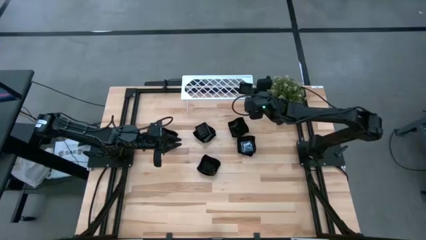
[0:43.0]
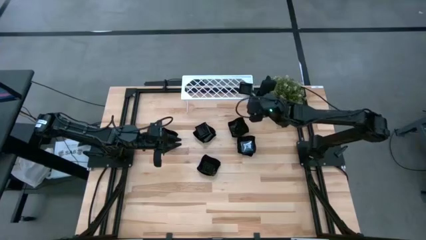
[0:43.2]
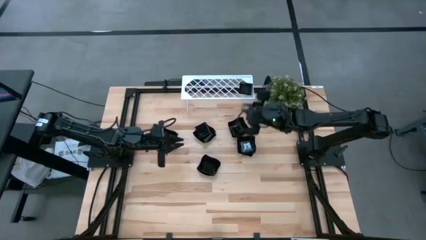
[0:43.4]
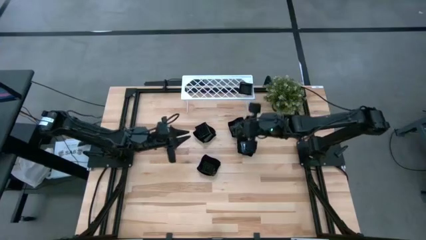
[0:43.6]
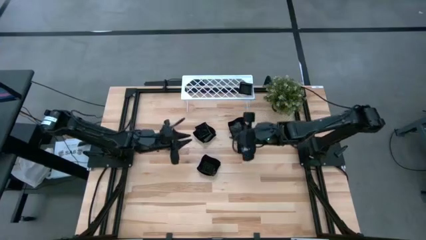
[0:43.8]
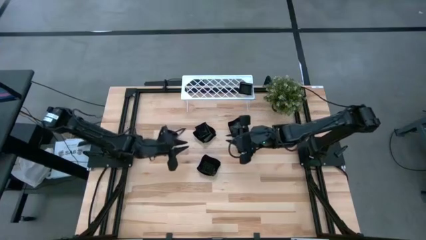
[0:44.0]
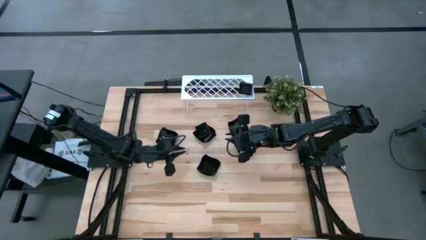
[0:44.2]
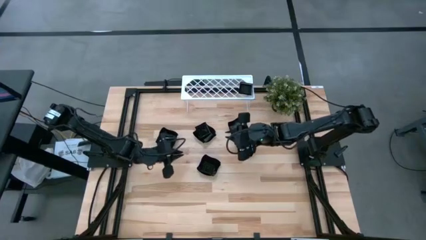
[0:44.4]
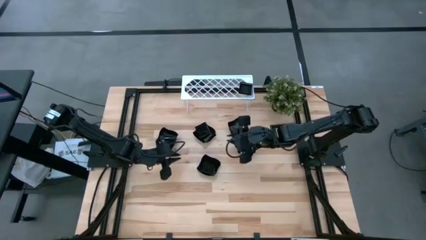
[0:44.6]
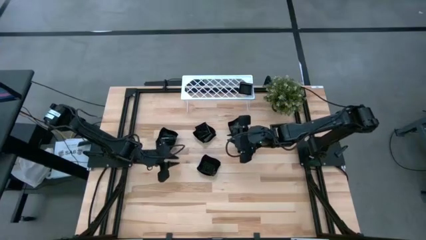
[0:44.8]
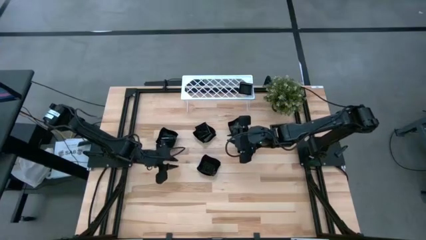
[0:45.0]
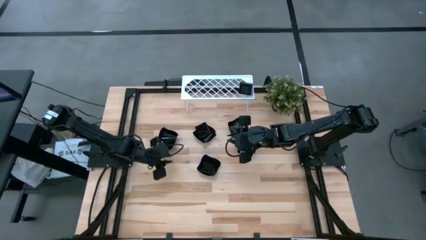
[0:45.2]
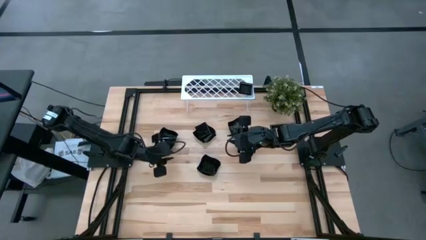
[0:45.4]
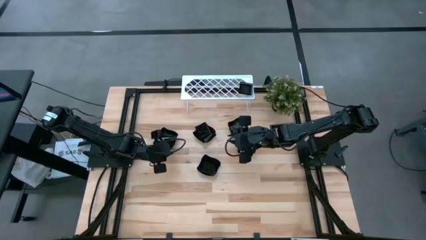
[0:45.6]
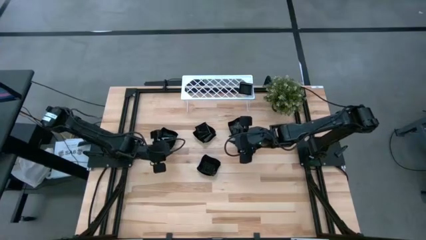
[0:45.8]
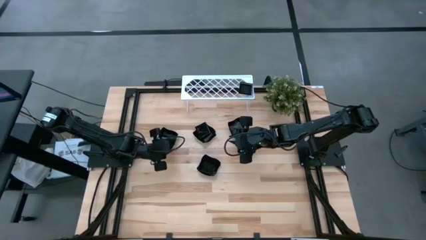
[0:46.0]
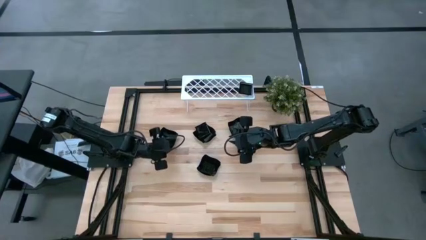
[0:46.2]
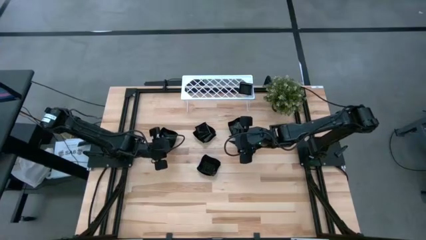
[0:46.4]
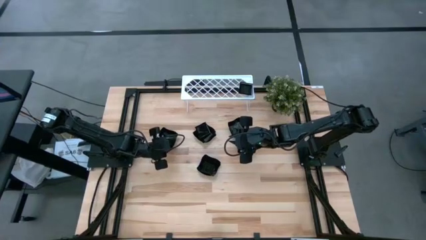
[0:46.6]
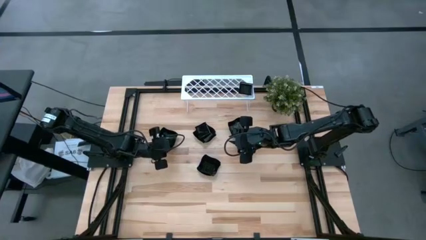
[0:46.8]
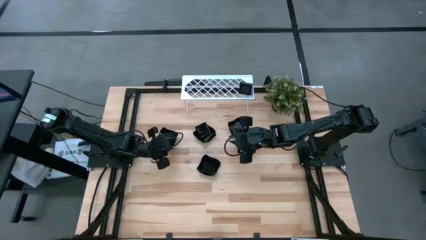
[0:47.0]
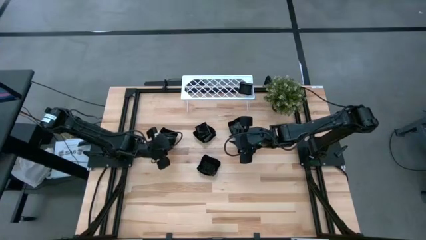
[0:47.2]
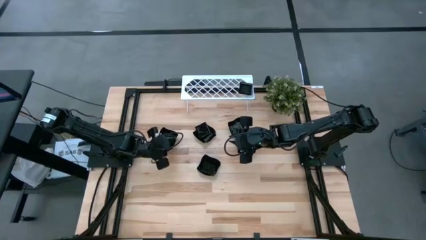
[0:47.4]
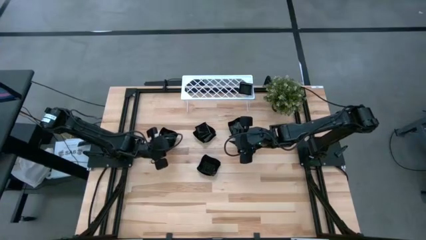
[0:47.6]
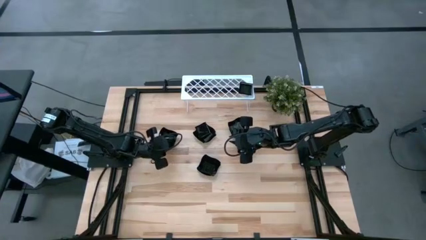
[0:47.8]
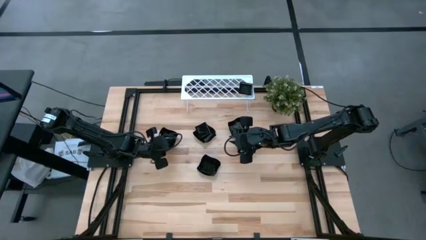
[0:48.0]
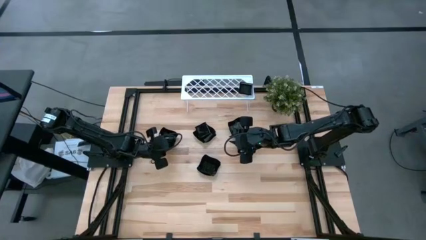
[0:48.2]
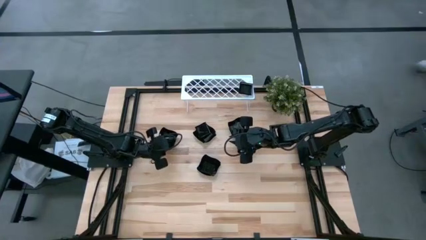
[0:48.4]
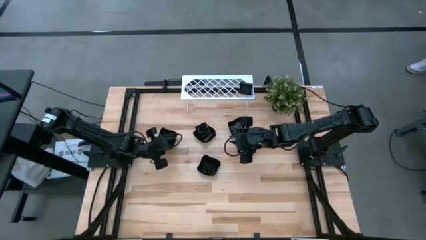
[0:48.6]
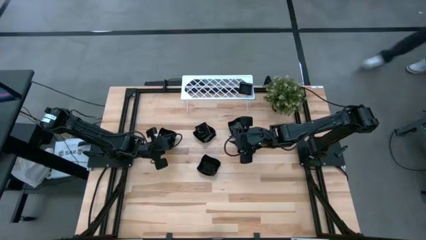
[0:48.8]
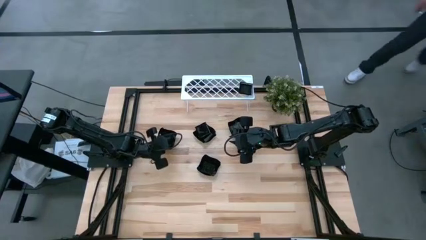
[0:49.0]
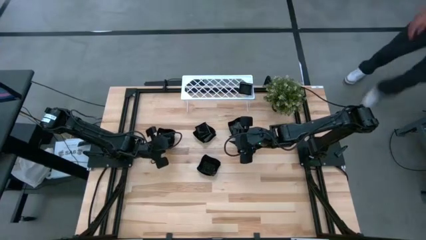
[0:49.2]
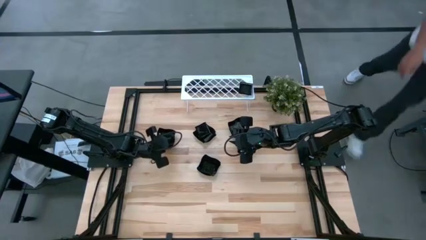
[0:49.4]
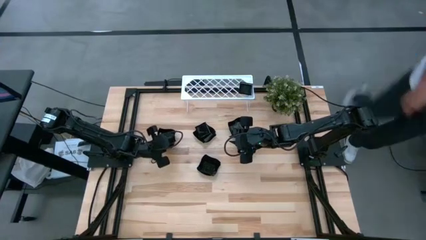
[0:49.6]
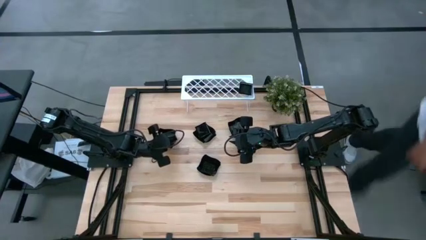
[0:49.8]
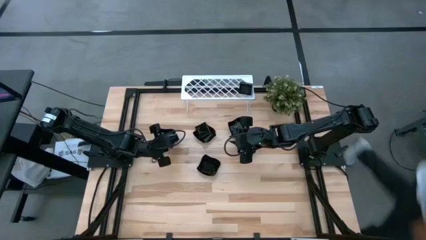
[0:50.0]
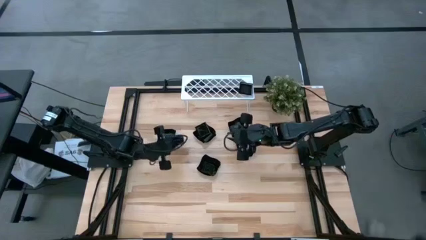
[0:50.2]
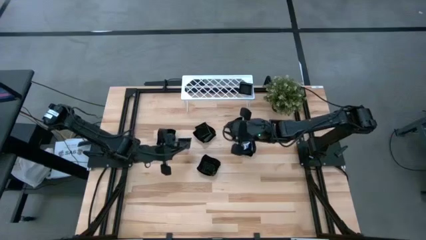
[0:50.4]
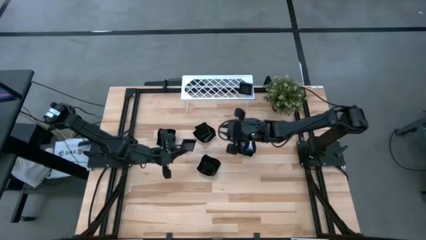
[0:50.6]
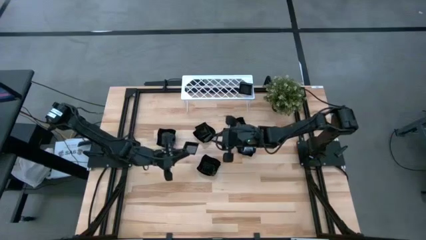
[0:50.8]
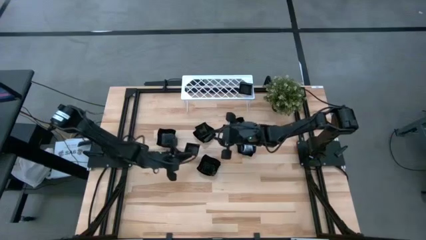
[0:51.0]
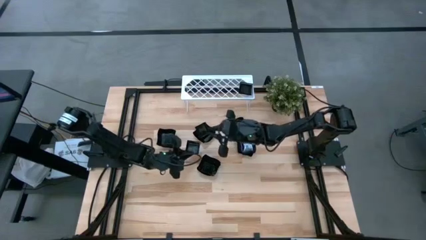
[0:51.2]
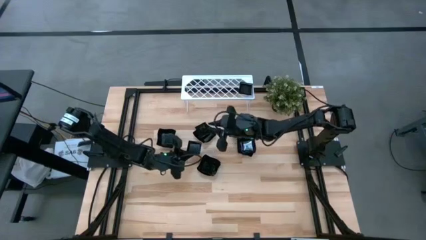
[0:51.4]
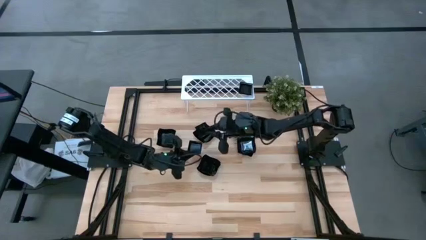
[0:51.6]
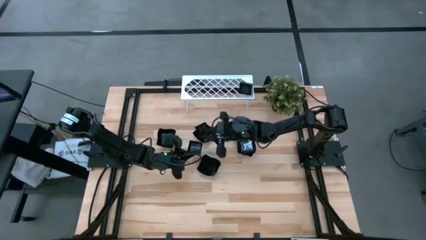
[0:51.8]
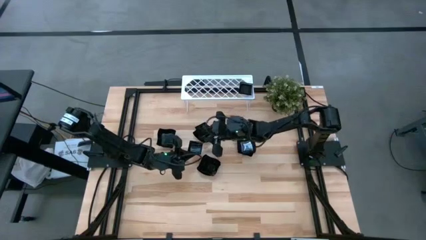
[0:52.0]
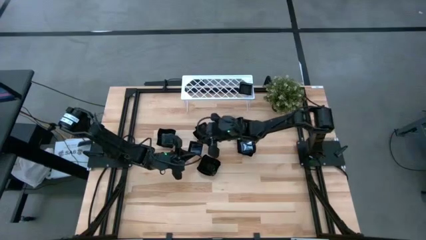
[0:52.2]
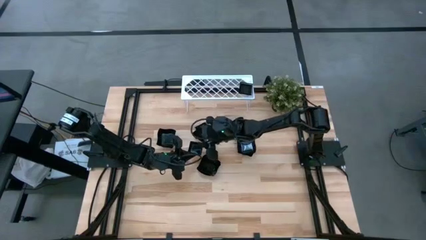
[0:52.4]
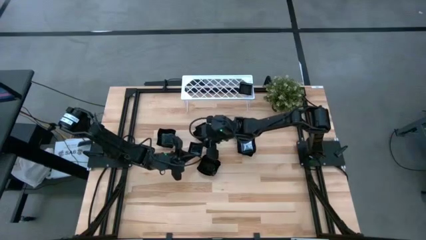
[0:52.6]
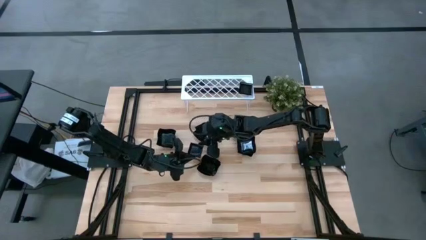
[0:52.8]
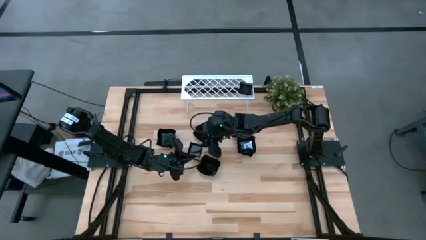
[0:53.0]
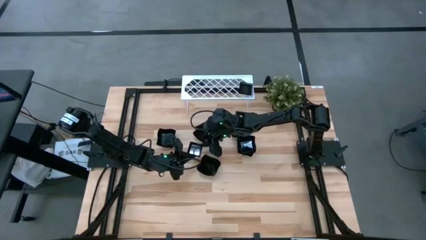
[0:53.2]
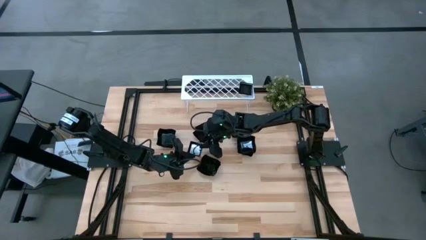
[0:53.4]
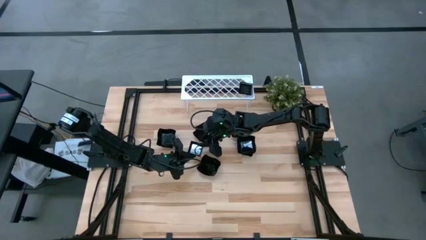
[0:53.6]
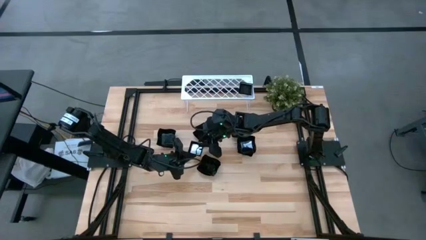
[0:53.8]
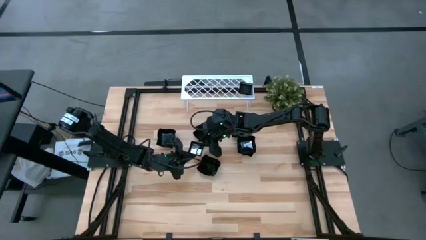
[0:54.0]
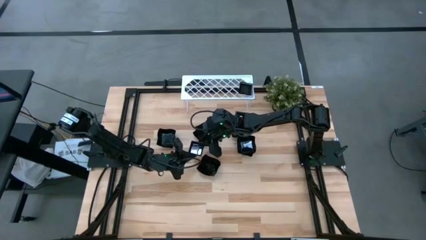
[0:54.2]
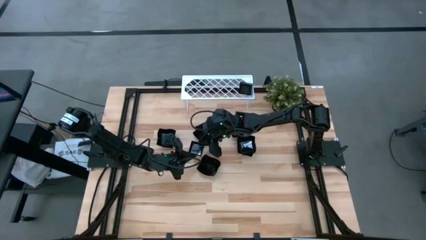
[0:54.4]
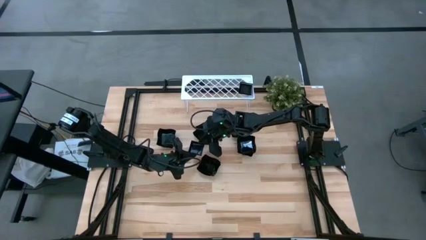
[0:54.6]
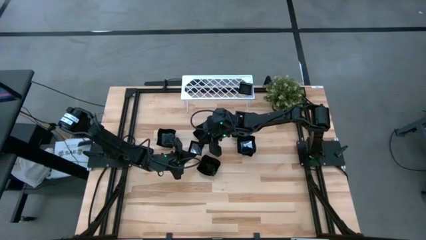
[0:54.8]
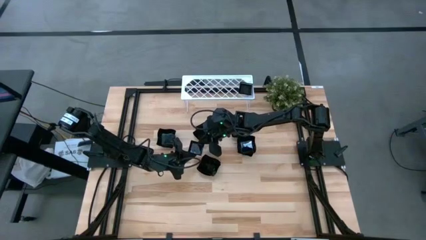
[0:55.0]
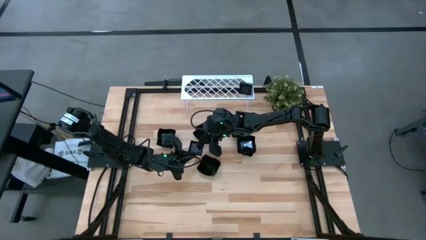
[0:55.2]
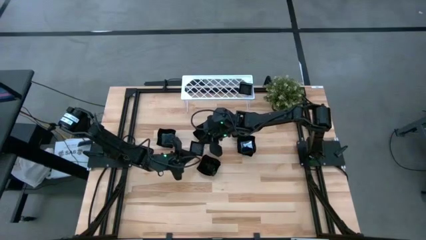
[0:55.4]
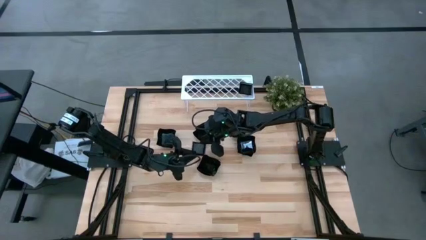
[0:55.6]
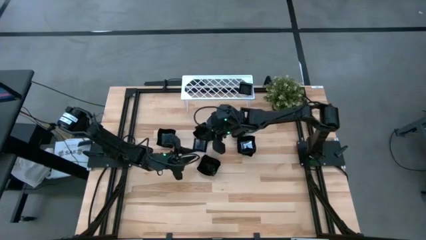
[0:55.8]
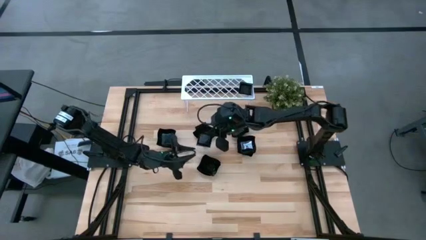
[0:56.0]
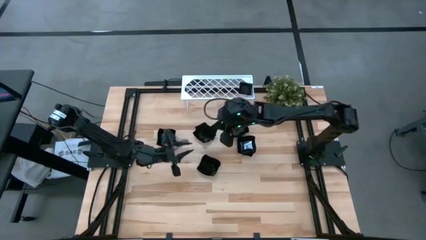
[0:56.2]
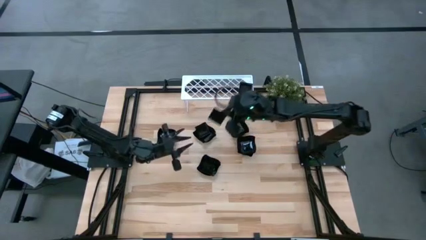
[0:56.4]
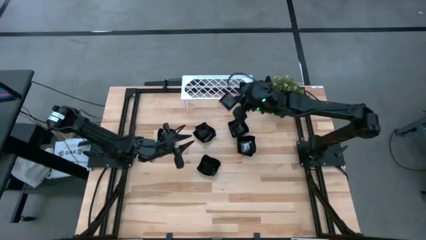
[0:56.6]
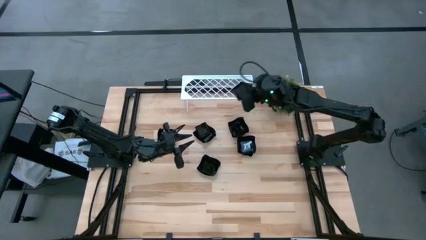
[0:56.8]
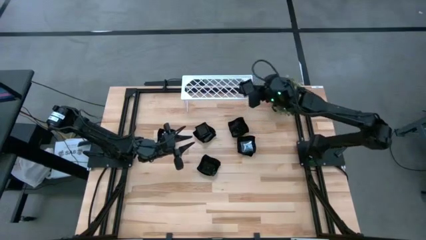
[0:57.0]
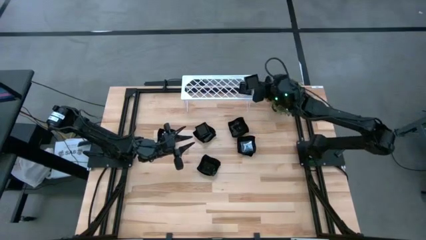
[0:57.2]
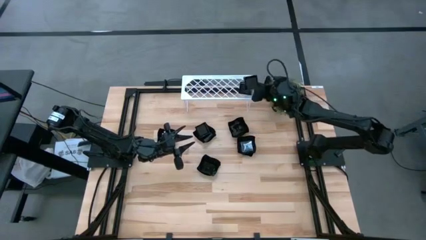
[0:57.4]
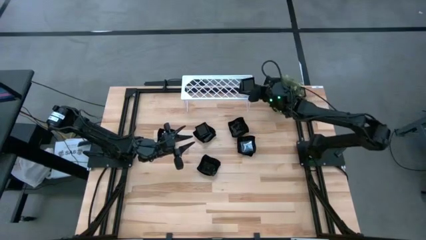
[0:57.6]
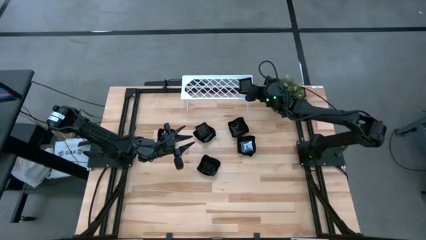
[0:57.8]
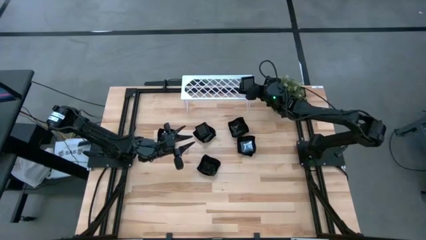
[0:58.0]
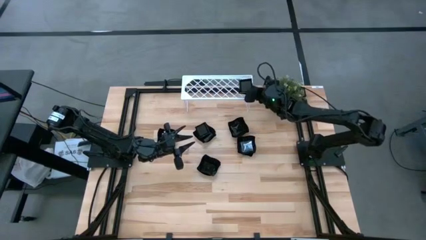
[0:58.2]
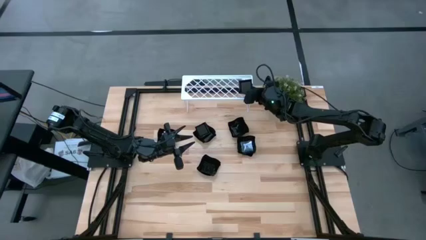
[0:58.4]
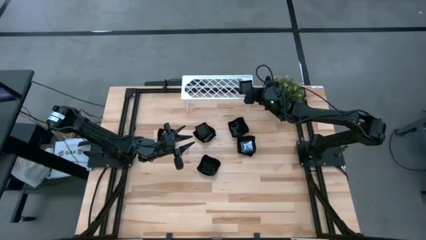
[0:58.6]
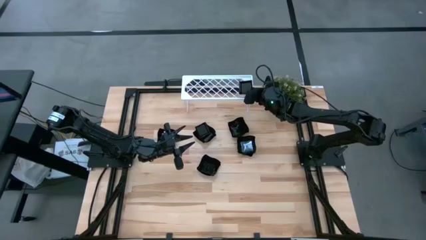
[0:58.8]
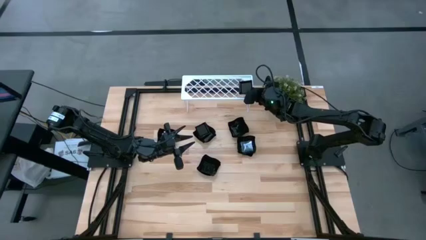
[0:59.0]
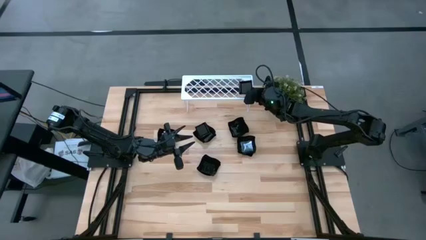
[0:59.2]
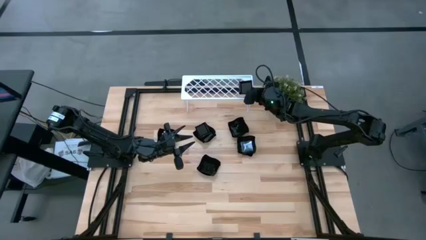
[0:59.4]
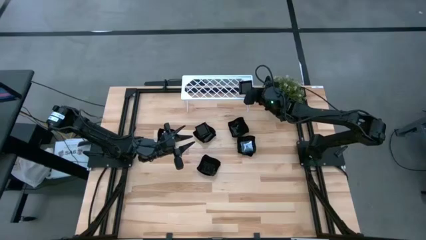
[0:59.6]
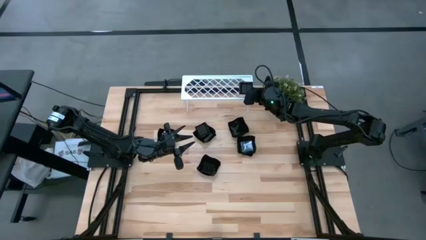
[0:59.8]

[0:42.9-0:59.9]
Task: Pick & Place Mini shaped plates
Stack the black square plate on top of the black square plate on the shelf
